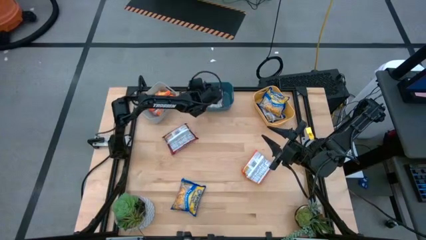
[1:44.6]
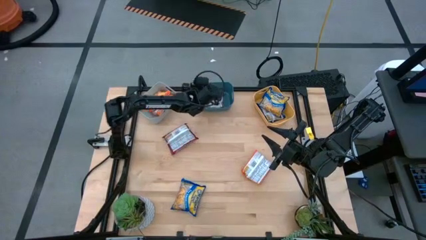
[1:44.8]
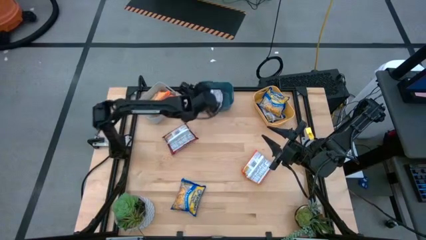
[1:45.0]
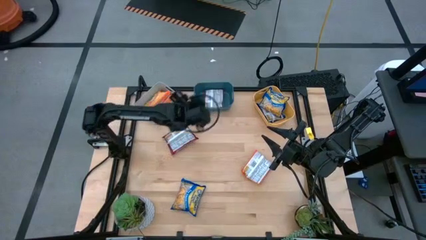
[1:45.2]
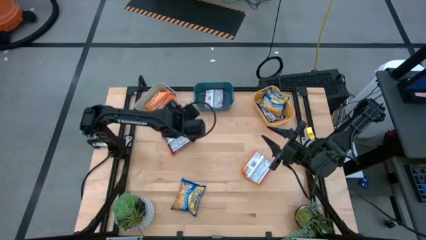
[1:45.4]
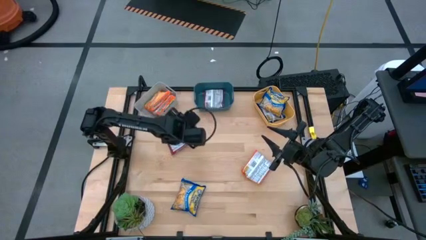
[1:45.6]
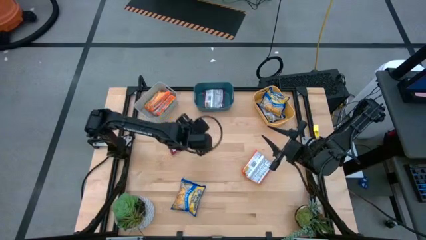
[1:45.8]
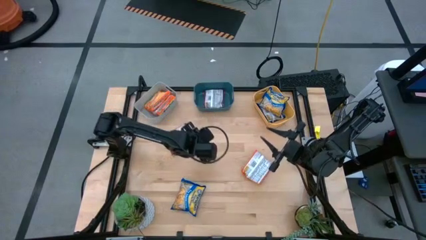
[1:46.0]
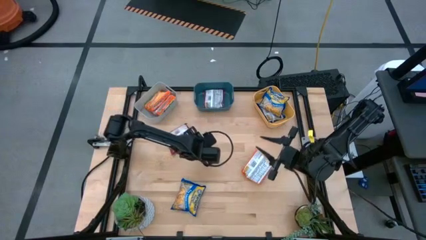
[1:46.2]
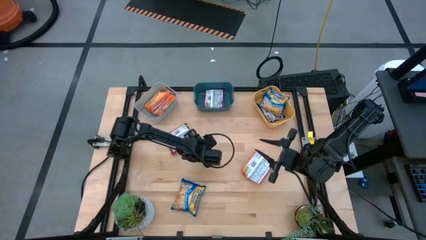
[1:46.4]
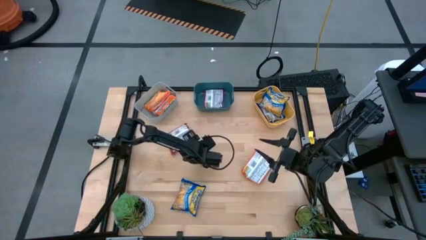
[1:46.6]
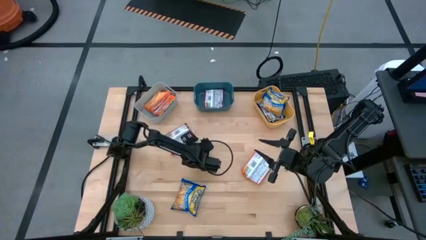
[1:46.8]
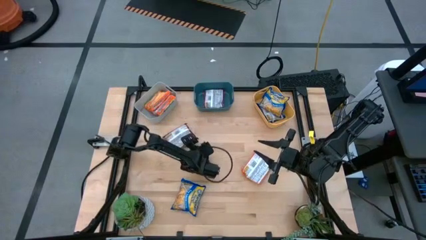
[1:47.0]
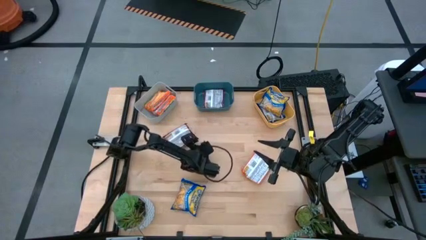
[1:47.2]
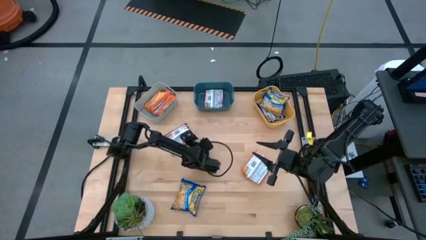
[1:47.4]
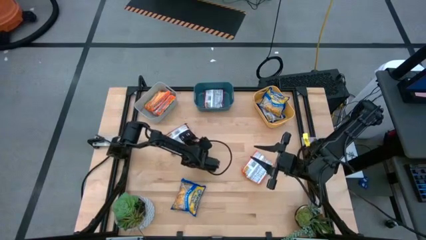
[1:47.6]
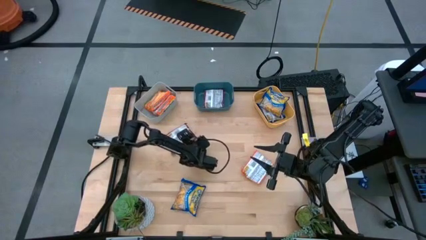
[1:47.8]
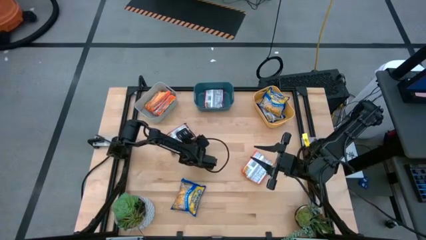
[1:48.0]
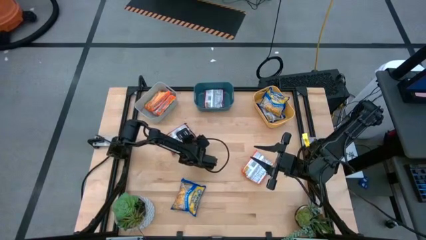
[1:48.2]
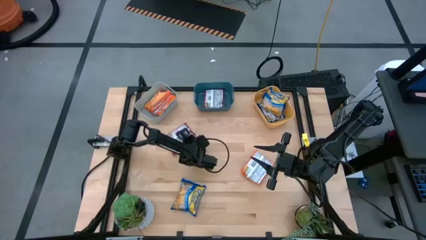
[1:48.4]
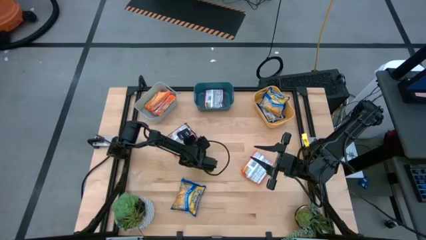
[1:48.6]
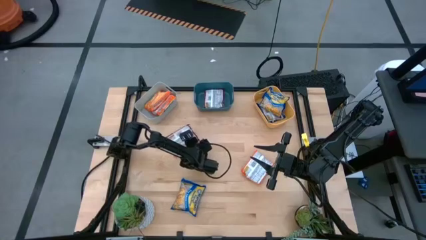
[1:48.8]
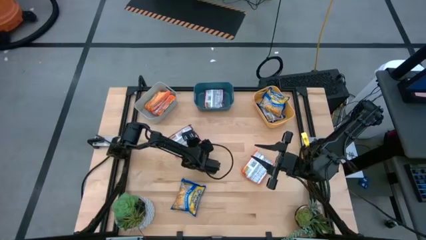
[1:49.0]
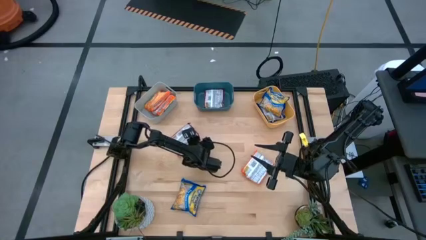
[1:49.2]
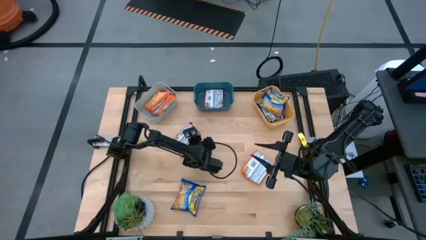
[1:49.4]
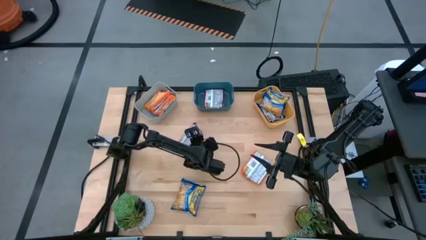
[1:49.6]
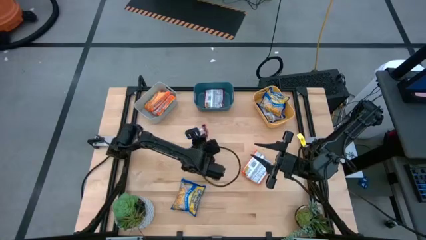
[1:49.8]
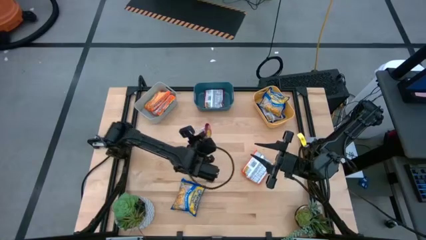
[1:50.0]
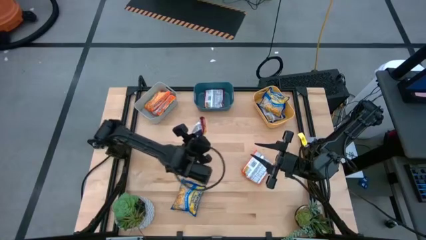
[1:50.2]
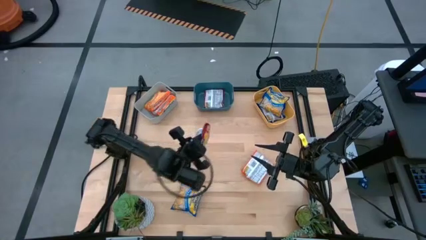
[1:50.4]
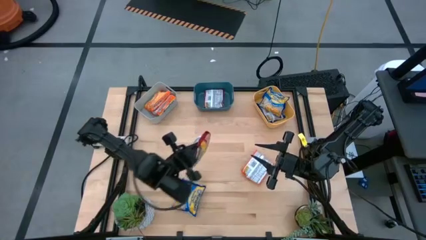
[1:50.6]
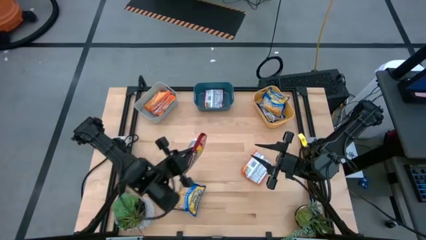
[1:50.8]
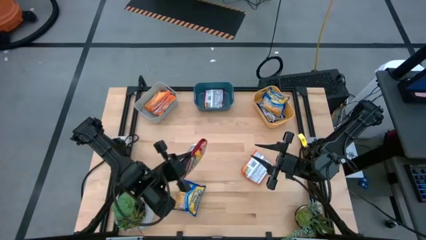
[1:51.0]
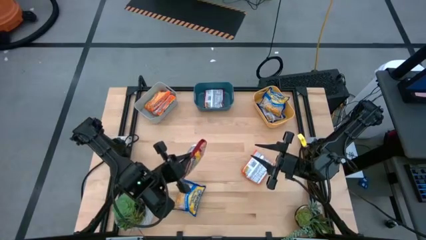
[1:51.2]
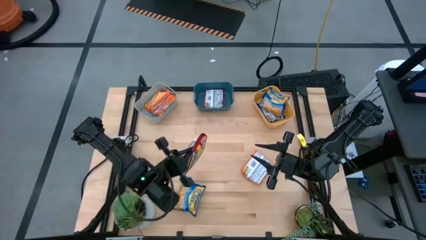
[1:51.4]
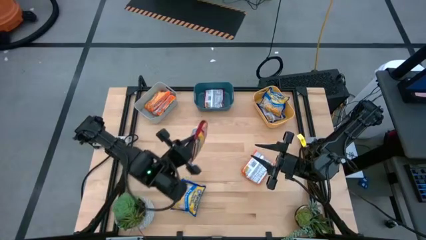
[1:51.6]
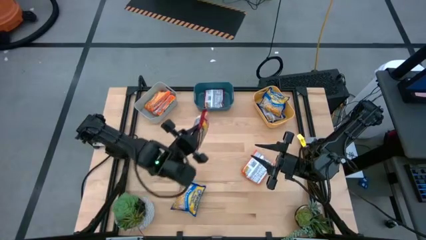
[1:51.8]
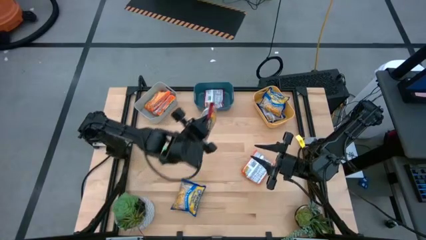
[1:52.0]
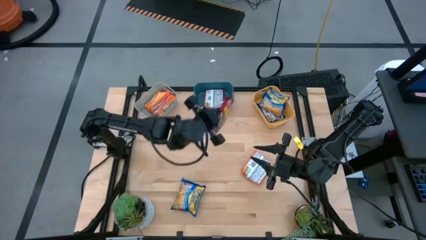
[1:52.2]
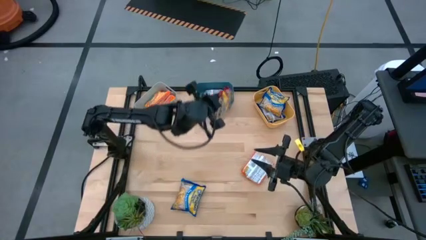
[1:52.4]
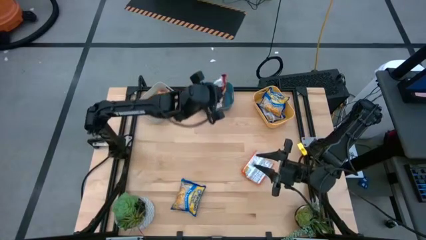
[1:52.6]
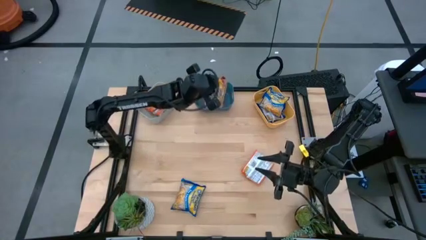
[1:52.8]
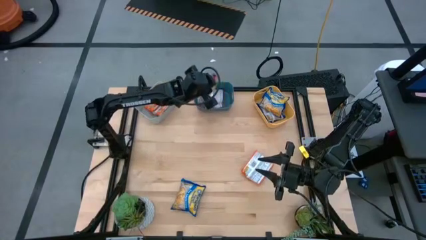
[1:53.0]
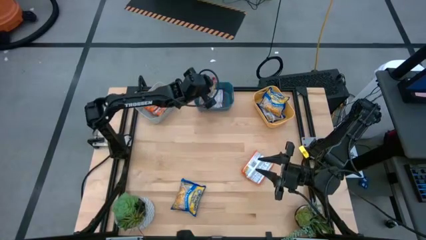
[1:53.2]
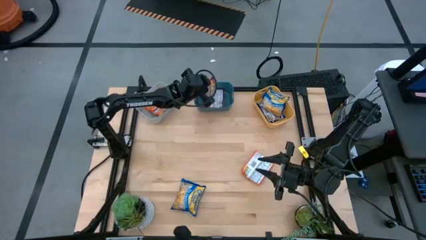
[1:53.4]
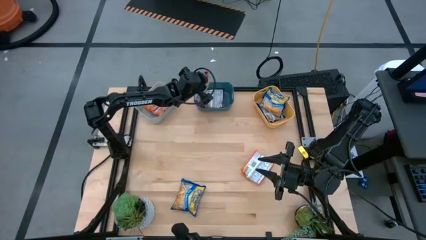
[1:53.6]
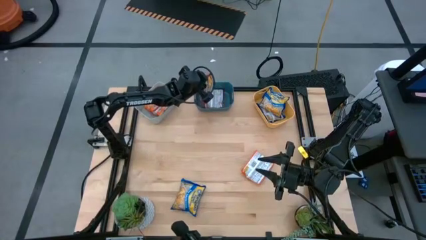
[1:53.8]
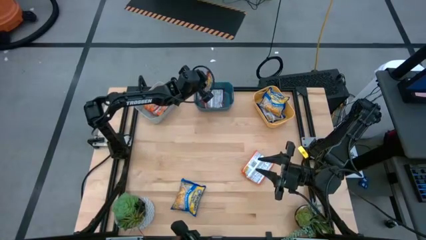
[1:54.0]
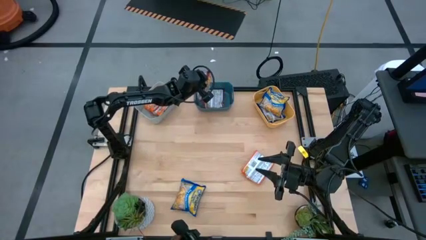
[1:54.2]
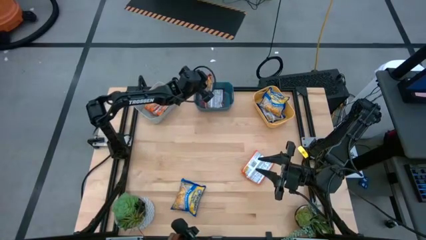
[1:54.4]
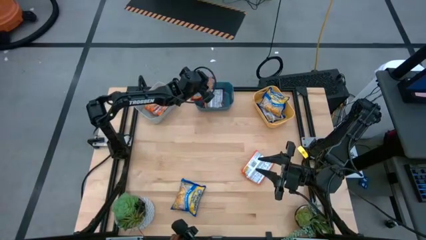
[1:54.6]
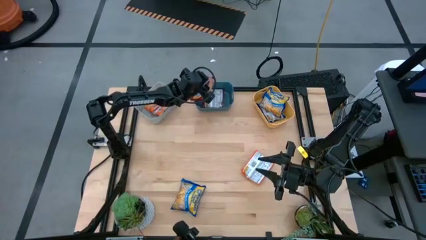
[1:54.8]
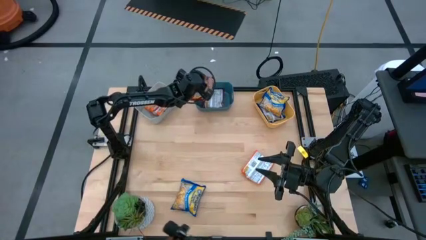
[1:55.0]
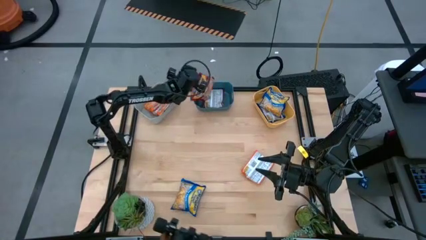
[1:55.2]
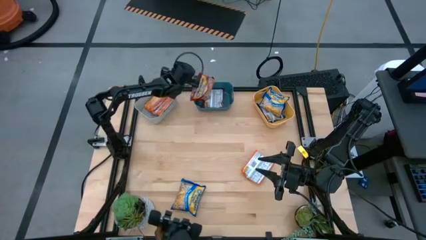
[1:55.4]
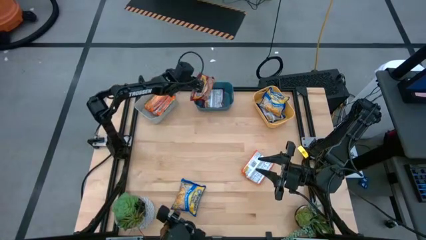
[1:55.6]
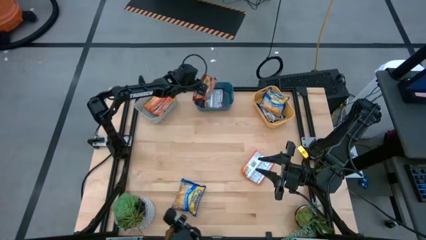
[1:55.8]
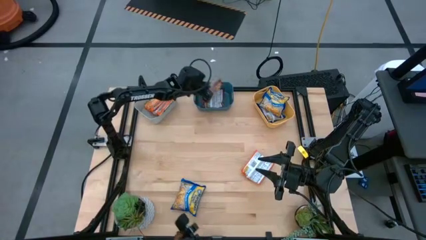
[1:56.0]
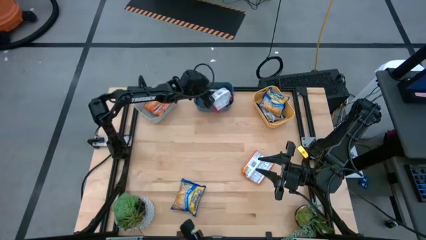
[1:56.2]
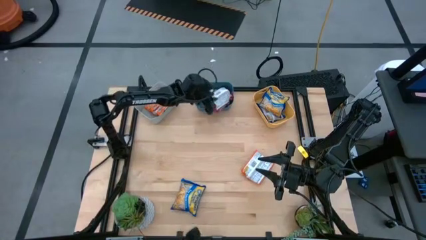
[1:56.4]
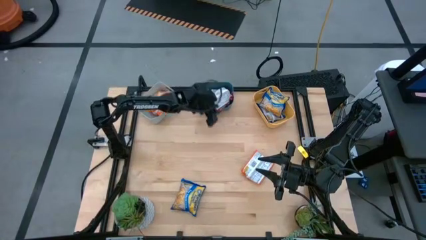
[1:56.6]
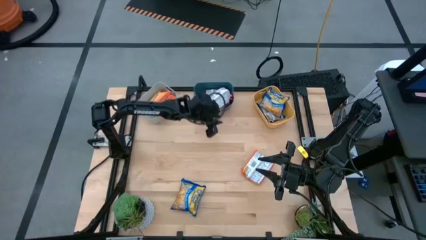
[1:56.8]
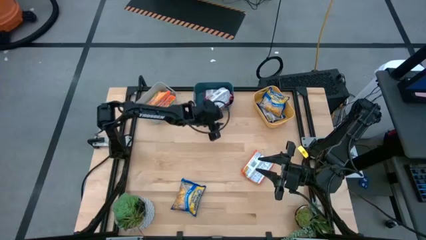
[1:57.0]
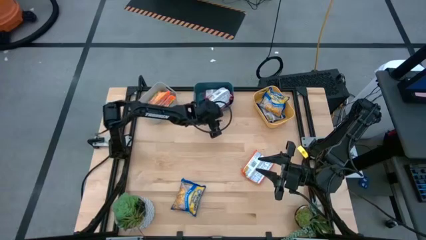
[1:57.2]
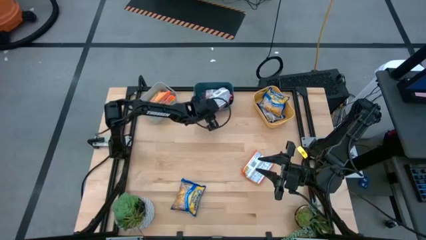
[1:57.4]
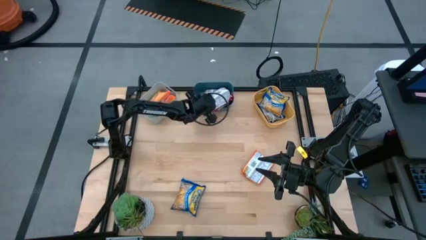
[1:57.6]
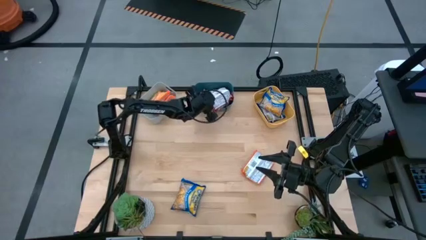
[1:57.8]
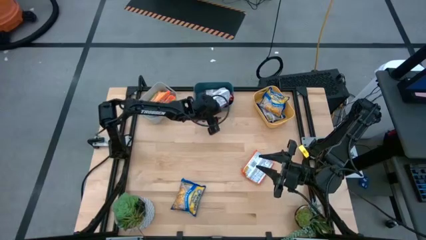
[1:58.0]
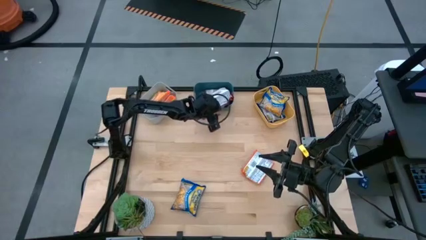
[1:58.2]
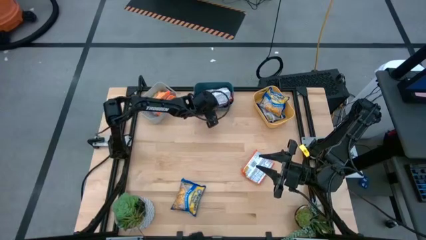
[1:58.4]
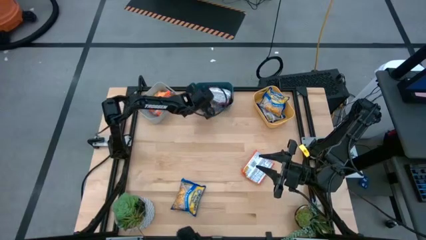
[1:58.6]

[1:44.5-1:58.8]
Task: Sort Maruchan noodles
Put the red noodle pack into the blue bin

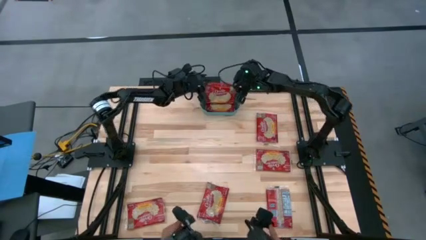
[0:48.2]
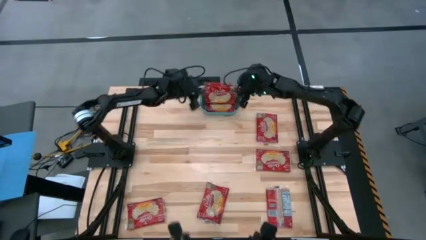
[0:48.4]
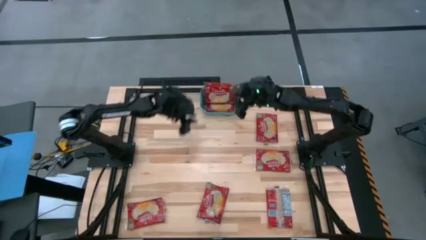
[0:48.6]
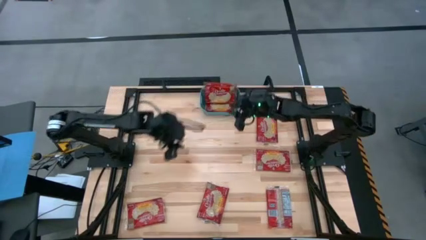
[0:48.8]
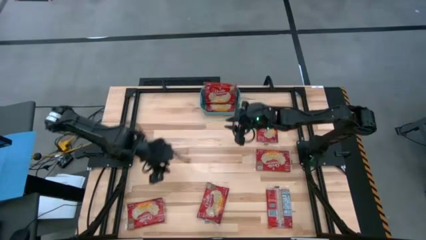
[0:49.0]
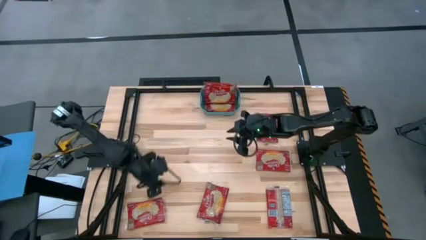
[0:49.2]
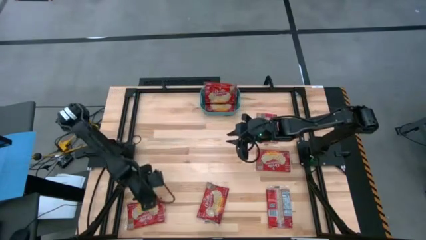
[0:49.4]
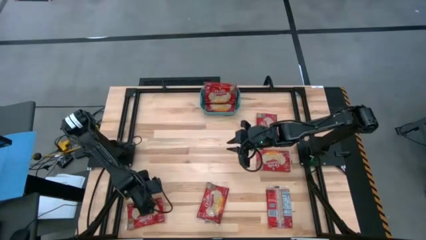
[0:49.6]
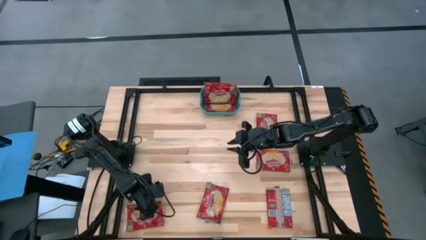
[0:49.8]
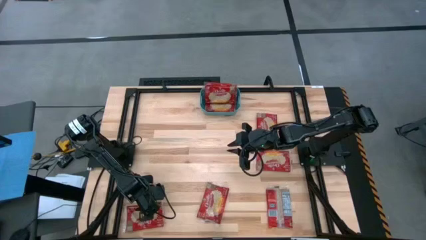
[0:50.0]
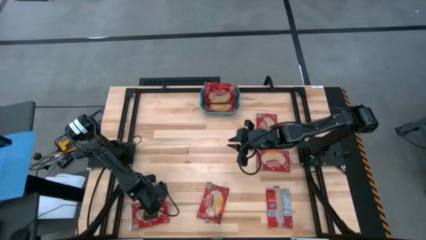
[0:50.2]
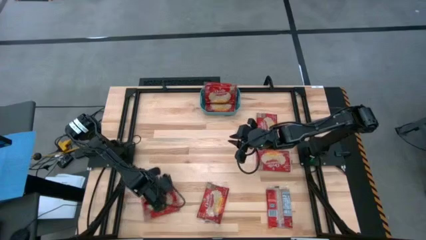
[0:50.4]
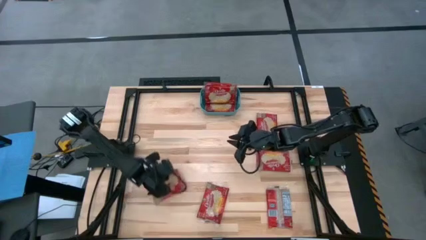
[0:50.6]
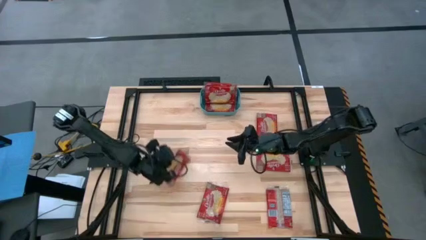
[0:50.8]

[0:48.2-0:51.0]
Task: Sort popcorn bags into baskets
Put the red popcorn bag into the blue bin
